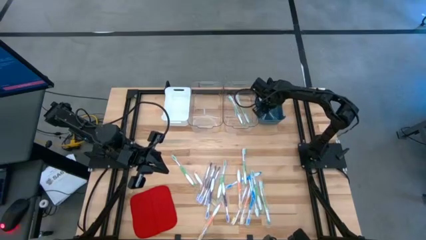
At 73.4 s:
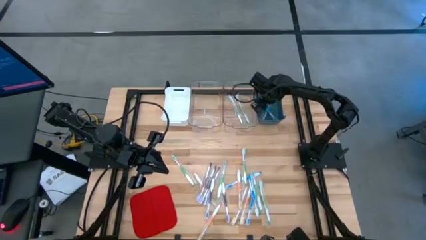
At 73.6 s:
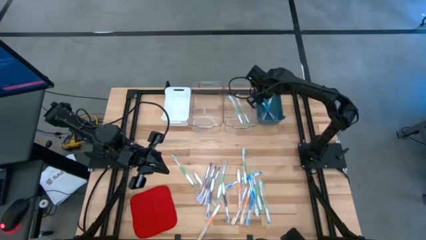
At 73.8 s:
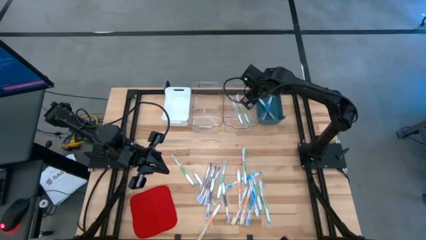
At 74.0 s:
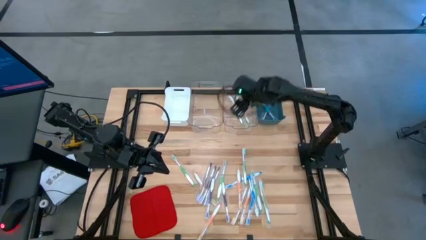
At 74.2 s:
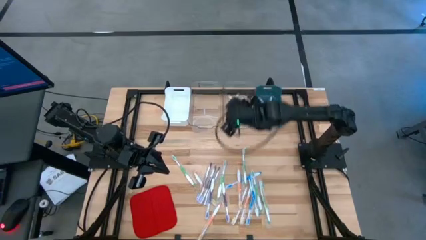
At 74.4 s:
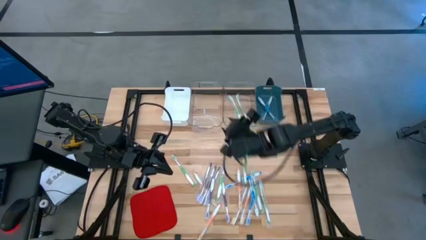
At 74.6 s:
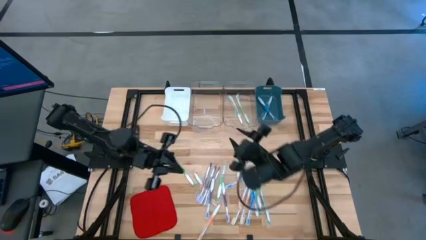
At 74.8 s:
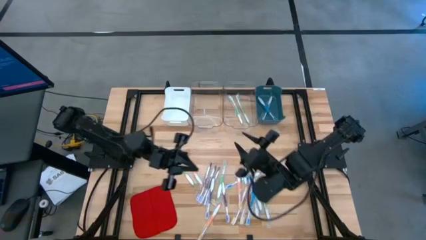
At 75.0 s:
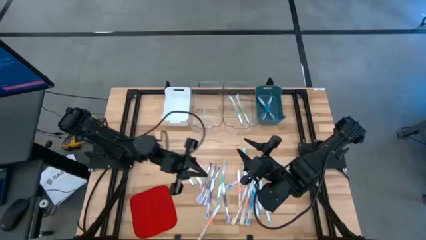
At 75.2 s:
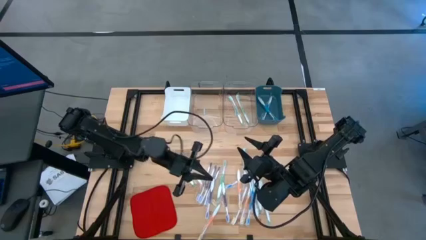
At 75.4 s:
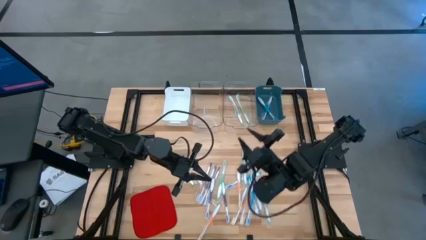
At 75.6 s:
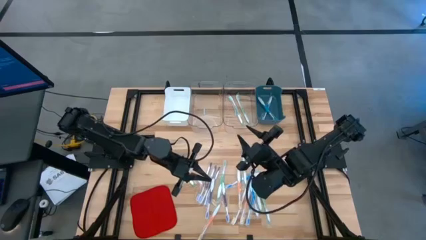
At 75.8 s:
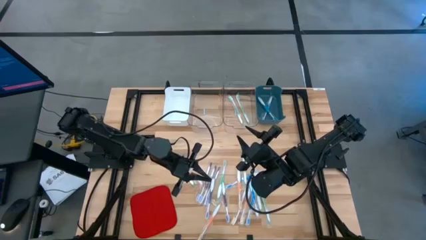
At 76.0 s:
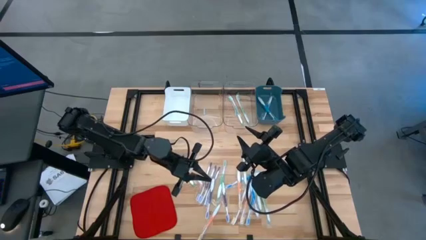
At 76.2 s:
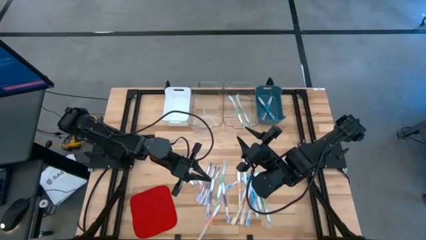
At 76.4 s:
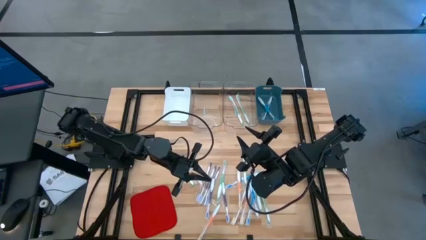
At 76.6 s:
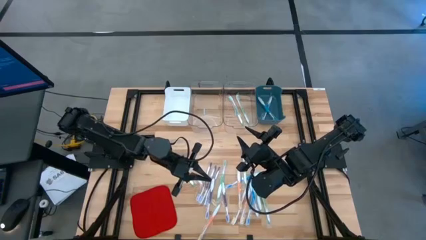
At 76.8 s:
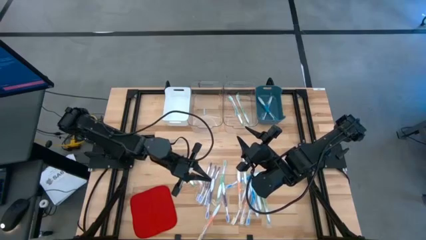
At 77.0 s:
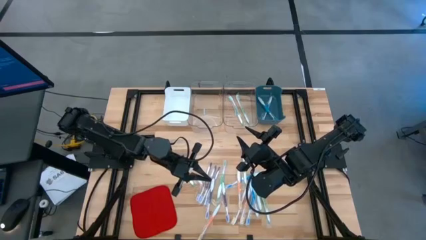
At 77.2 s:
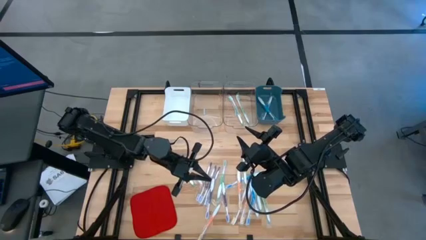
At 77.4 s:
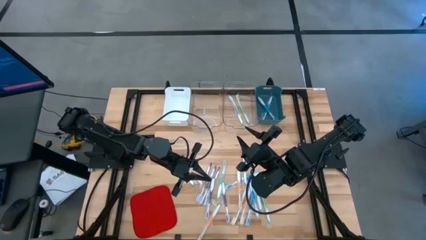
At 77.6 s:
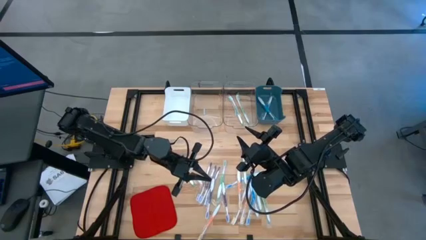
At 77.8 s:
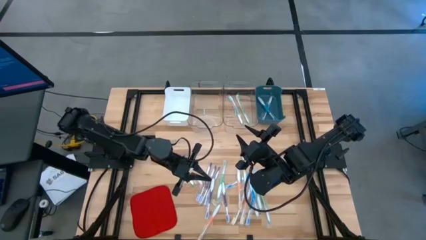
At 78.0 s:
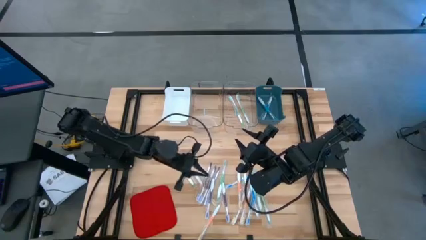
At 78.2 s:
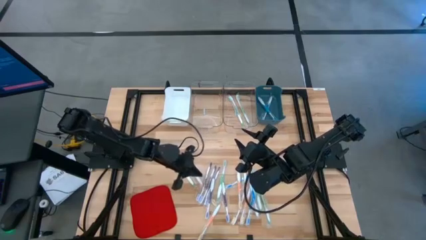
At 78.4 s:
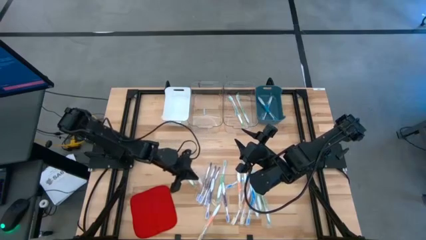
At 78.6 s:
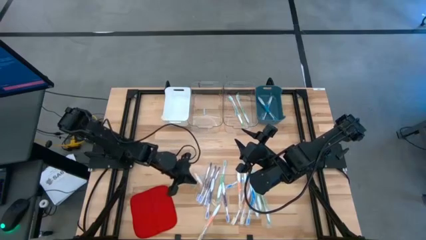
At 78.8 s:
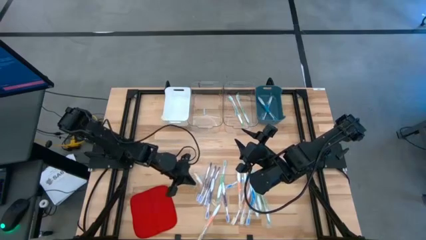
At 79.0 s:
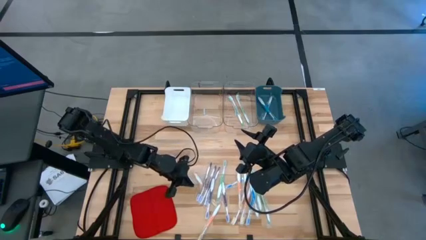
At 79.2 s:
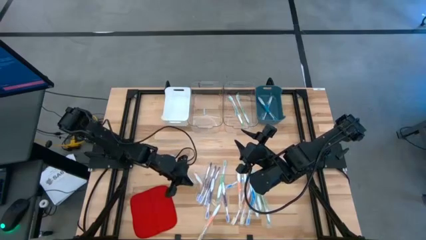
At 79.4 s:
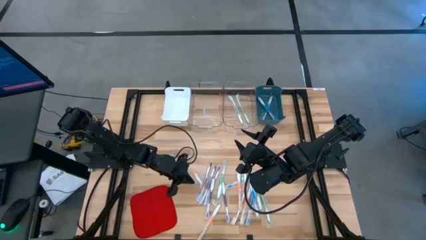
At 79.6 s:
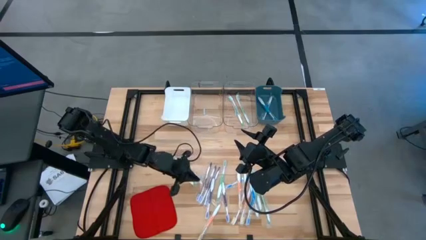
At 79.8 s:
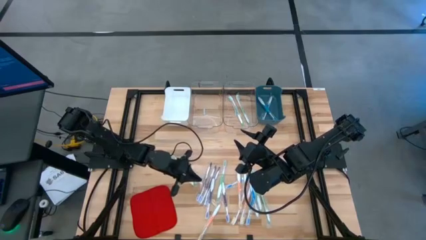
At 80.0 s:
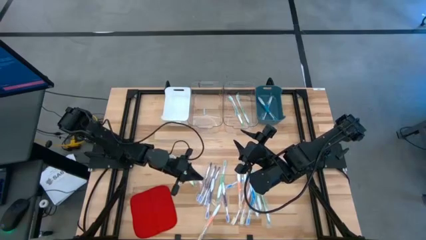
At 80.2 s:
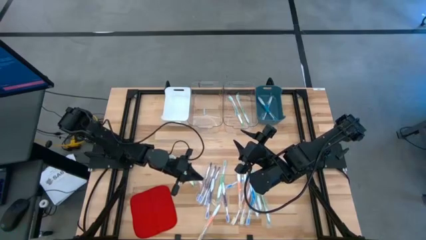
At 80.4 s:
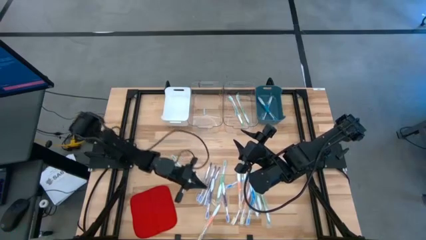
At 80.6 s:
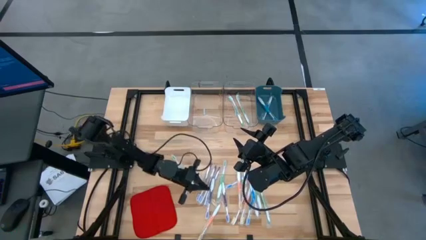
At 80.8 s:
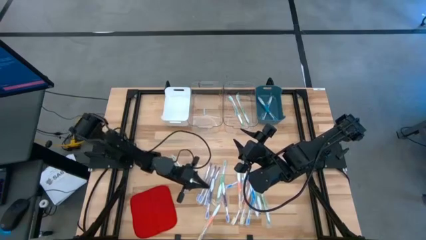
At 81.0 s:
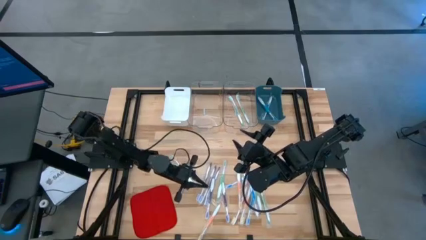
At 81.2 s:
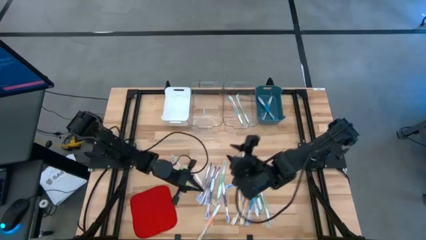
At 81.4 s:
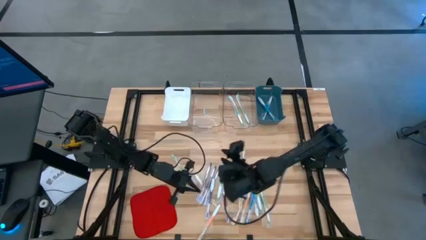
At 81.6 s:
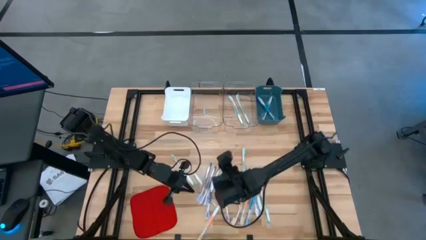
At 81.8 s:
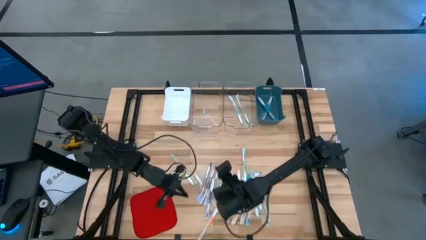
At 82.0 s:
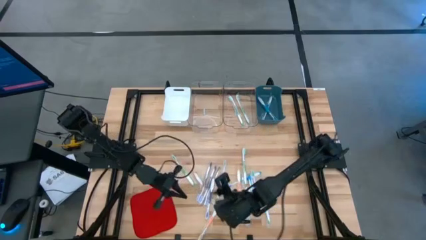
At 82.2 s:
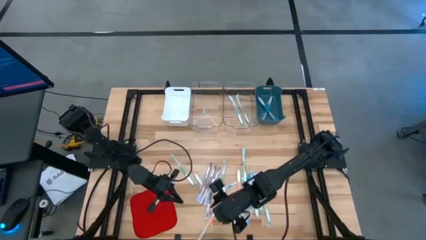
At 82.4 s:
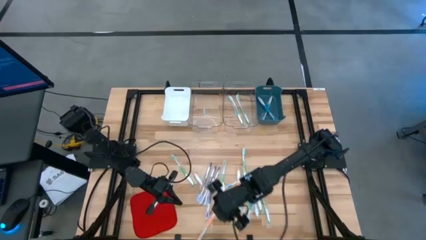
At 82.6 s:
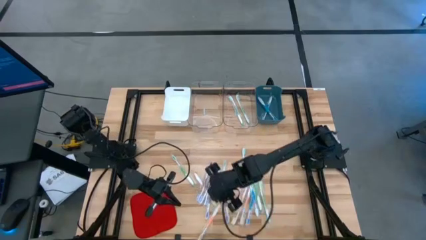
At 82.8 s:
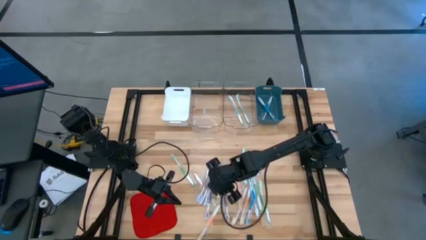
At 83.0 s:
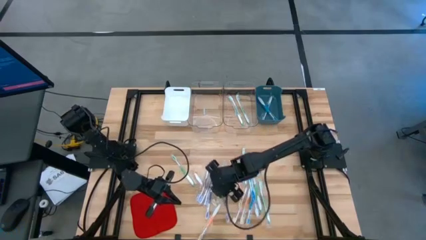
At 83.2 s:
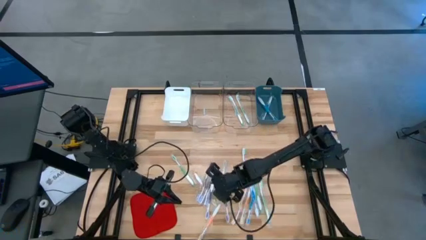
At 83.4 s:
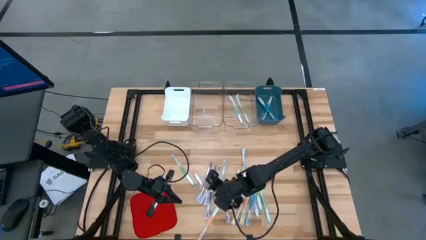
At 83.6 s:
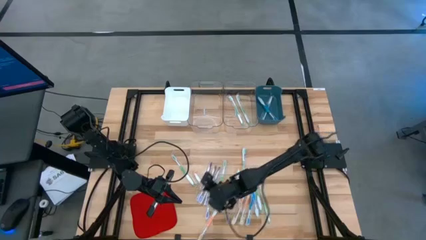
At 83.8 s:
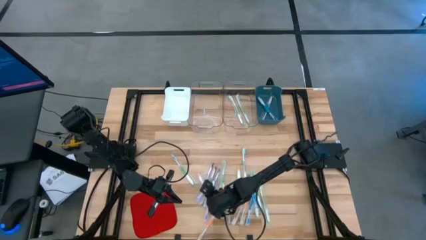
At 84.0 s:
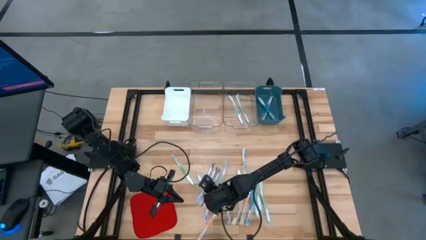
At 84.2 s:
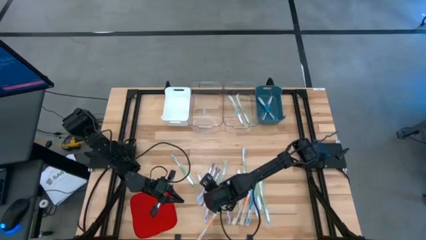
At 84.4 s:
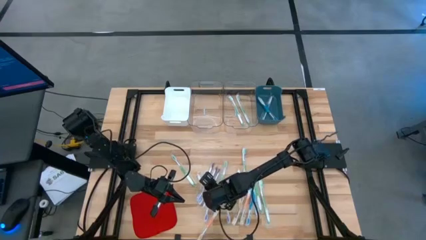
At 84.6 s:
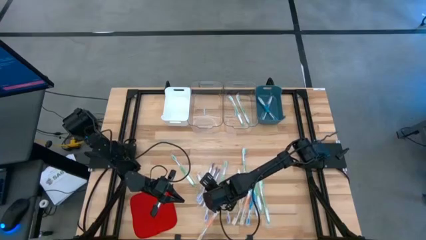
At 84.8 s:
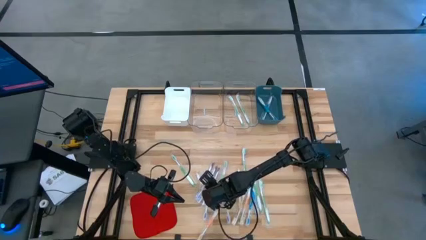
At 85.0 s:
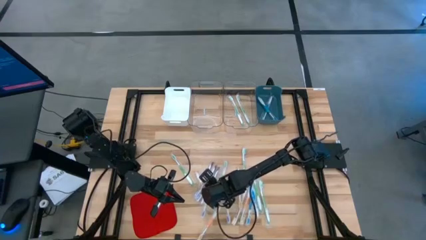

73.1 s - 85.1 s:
Task: Pick & Place Toothbrushes
Put the violet toothbrush into the white bin
